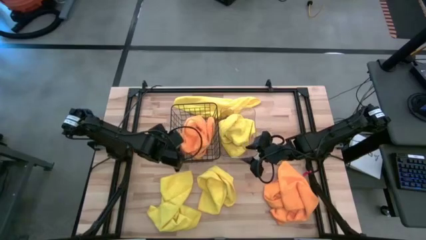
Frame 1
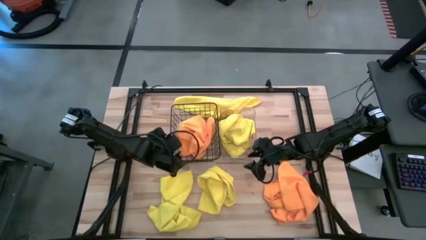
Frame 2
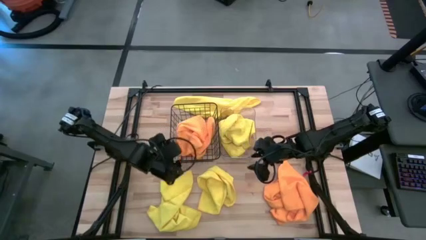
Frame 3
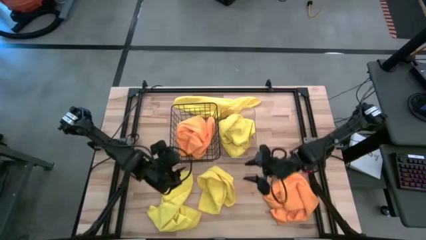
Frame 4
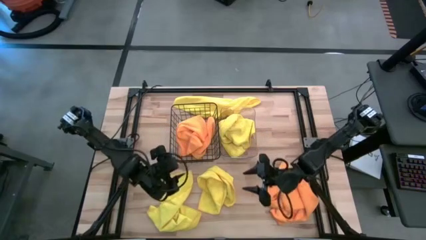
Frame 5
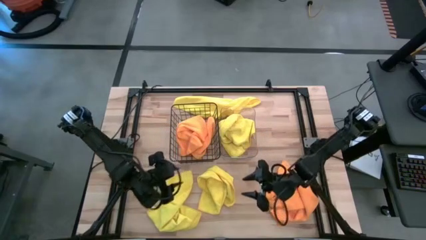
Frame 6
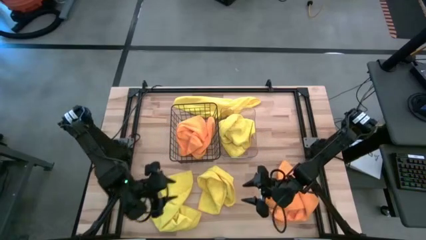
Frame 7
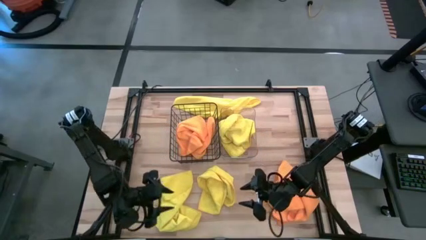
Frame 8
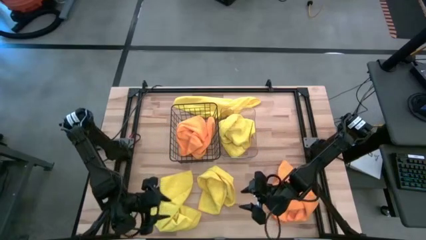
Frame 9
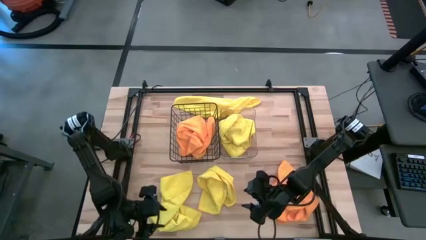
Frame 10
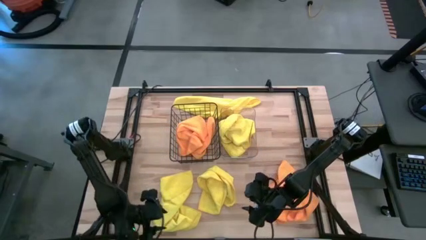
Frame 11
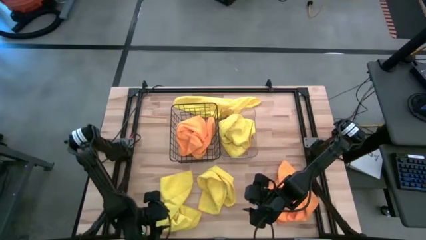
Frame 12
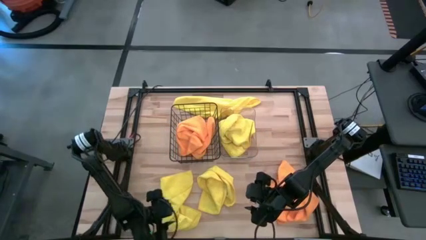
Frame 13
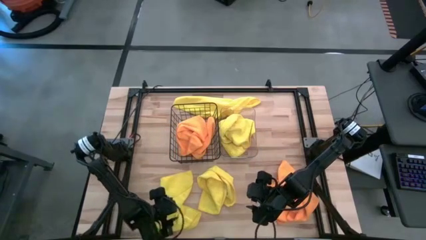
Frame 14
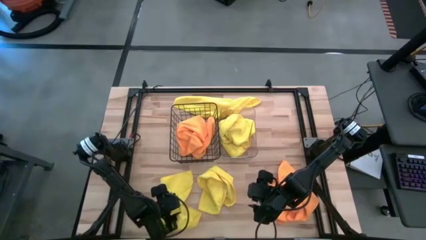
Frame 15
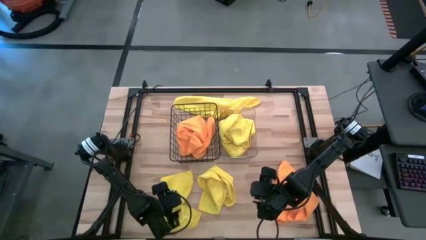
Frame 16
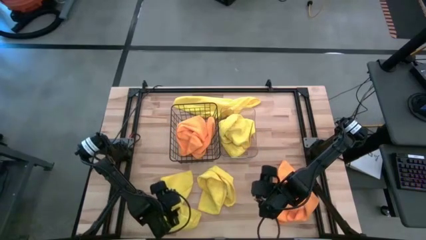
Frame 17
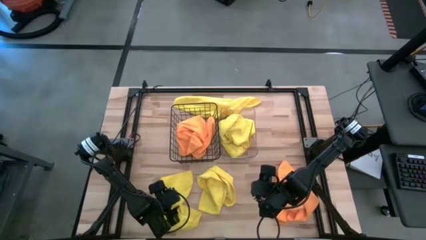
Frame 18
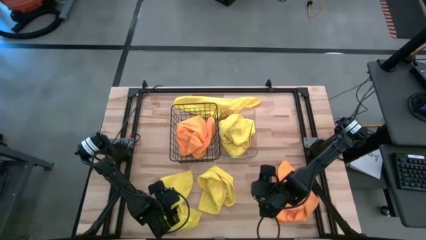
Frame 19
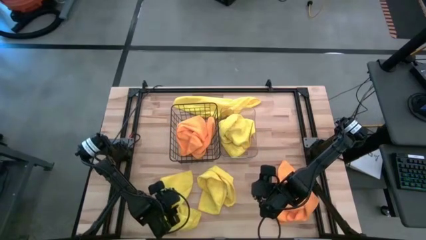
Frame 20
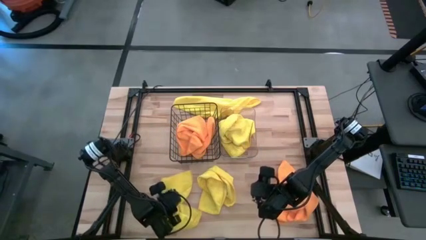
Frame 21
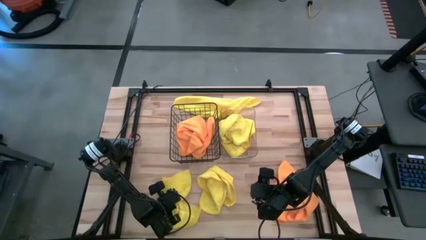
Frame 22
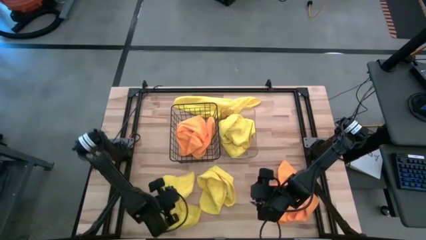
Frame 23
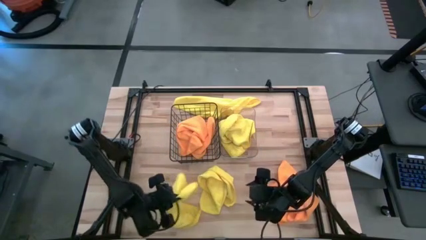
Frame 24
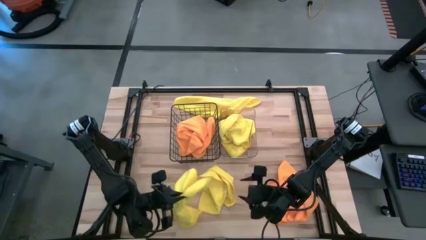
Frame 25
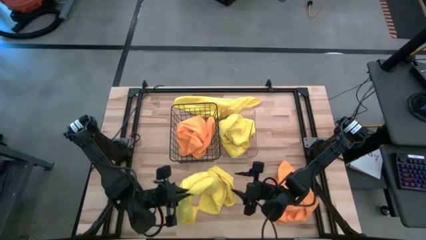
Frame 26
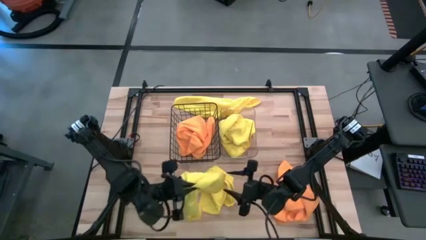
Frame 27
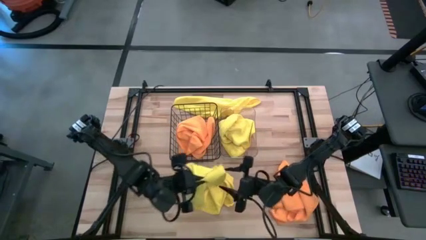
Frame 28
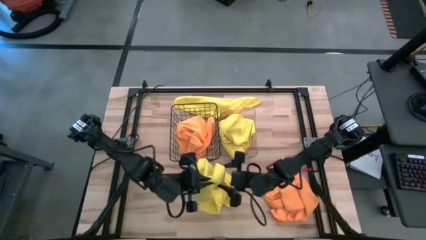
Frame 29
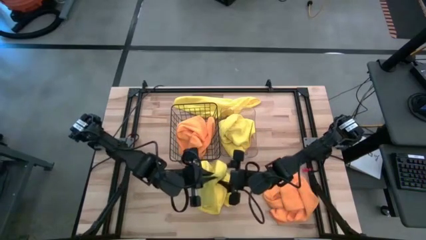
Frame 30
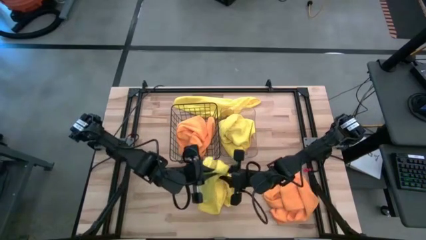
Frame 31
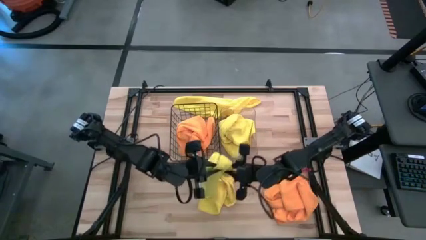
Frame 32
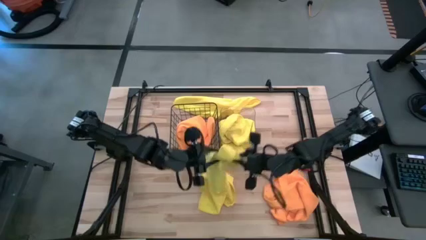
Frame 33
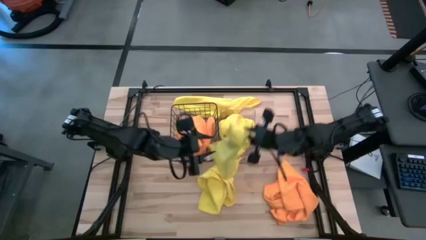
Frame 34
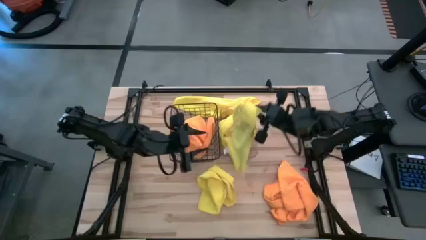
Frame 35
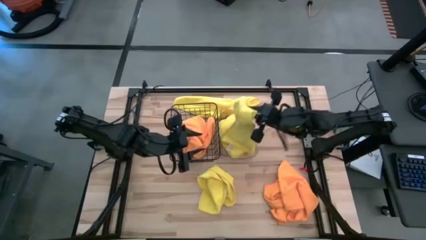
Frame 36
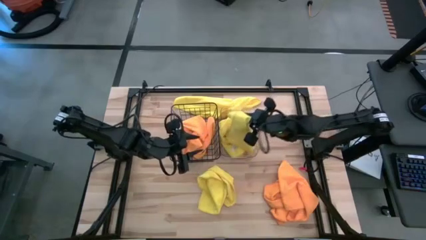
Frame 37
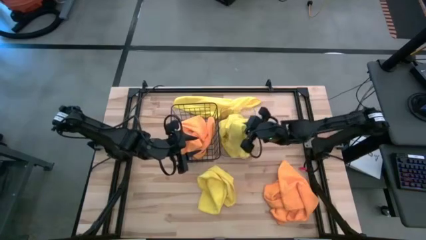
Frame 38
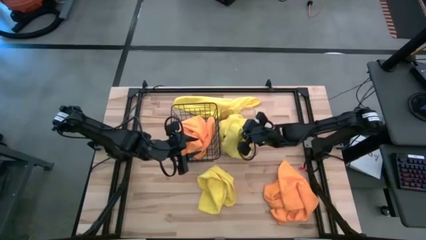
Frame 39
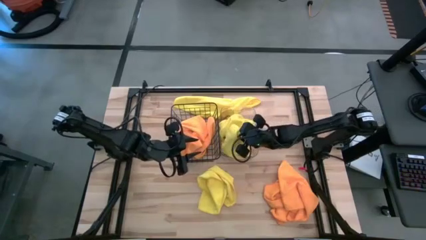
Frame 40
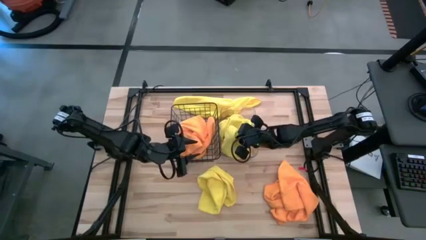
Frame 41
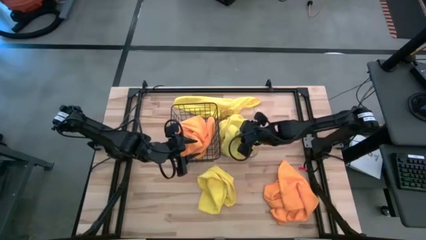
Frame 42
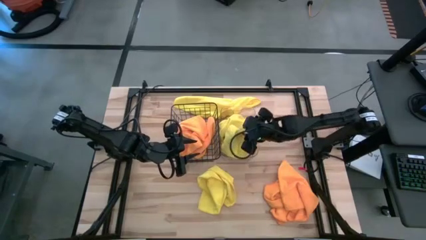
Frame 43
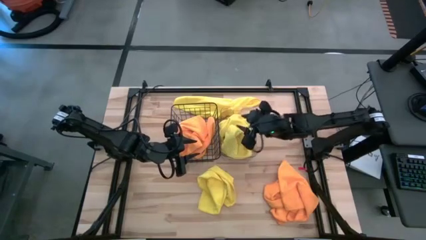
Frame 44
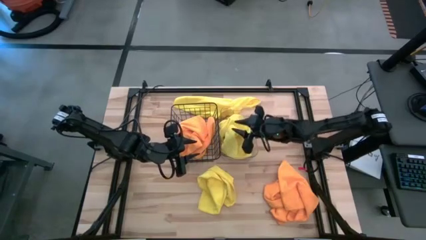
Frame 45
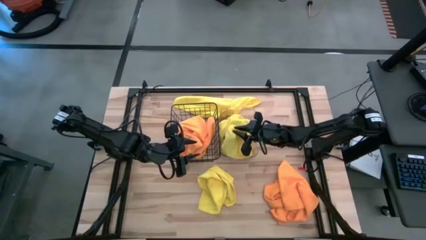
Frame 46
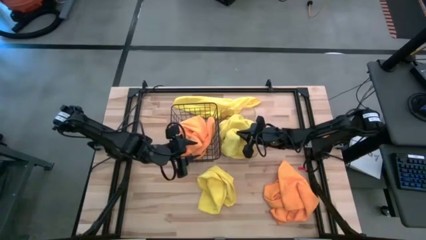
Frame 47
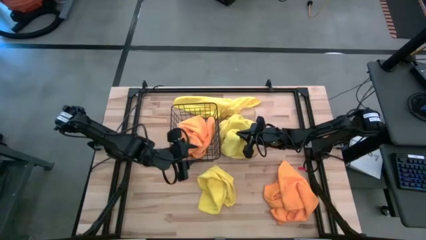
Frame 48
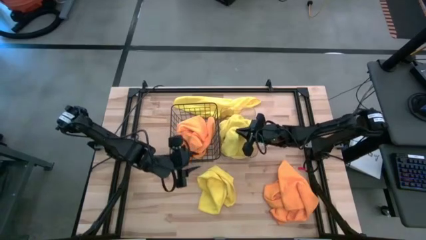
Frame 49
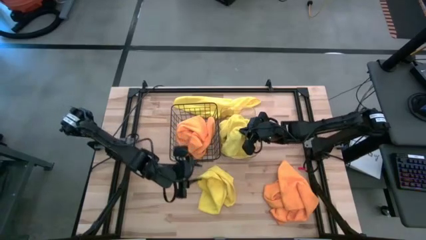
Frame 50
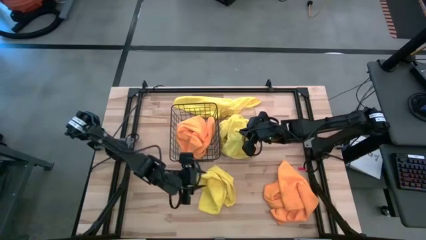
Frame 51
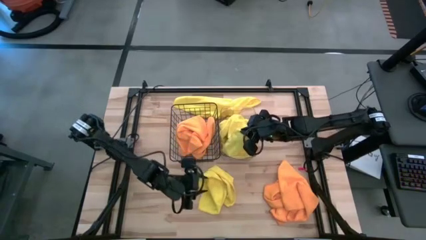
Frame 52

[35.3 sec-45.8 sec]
Task: Sort microfiber towel by color & place in baskets
Put the yellow microfiber towel into the transparent bin

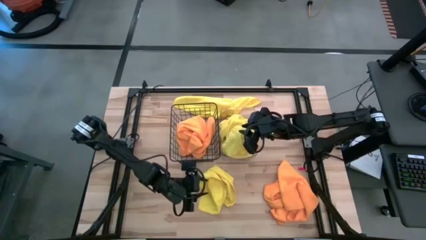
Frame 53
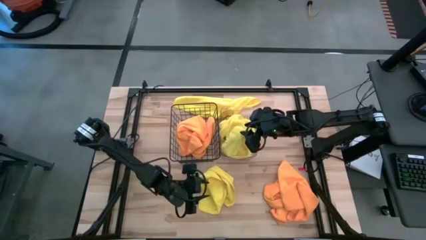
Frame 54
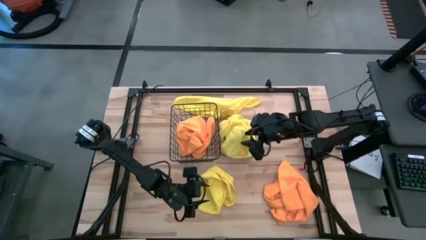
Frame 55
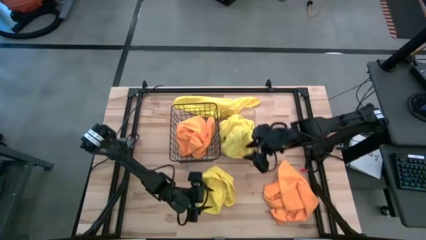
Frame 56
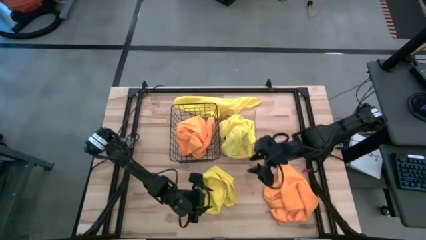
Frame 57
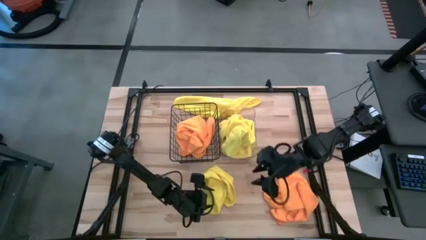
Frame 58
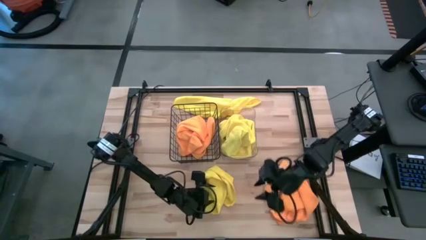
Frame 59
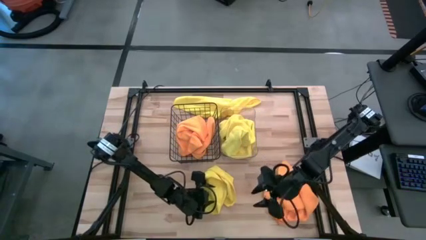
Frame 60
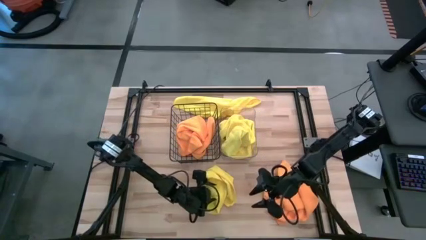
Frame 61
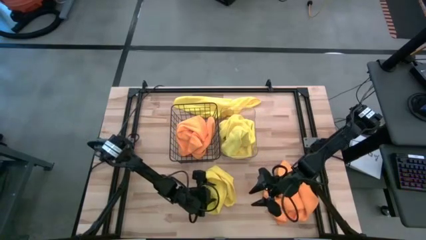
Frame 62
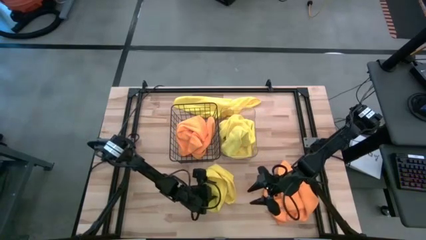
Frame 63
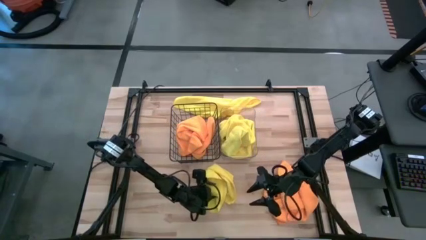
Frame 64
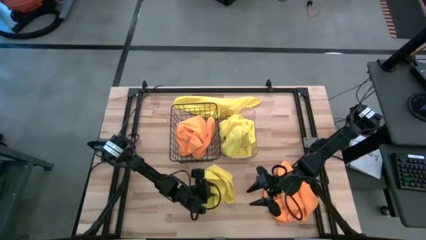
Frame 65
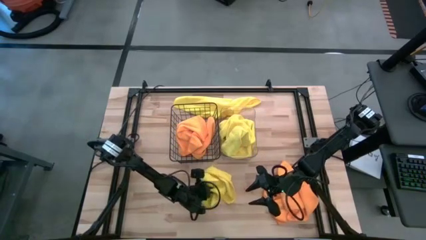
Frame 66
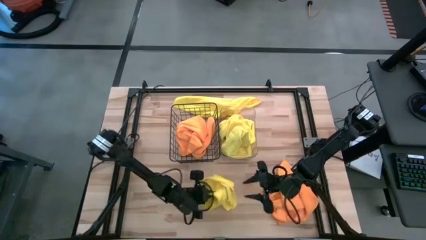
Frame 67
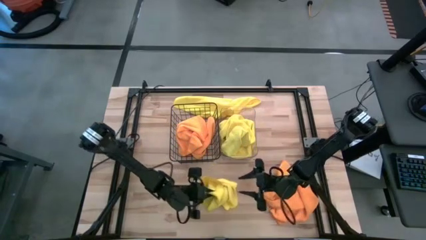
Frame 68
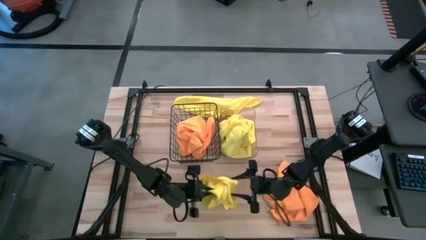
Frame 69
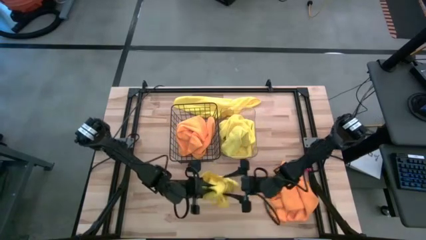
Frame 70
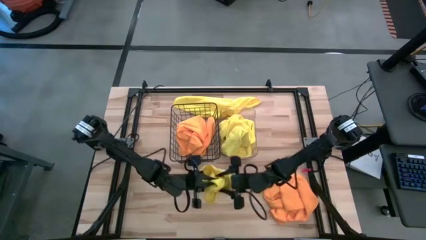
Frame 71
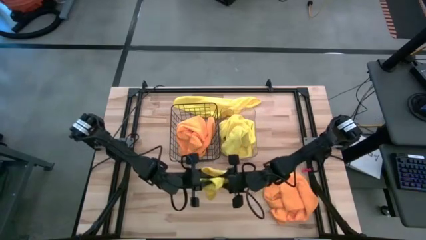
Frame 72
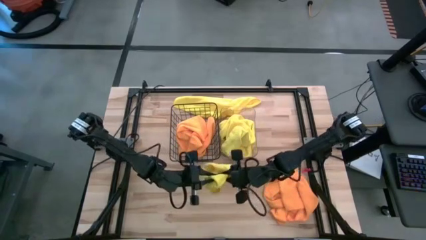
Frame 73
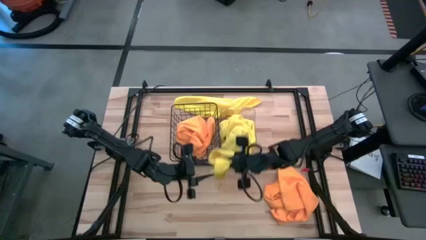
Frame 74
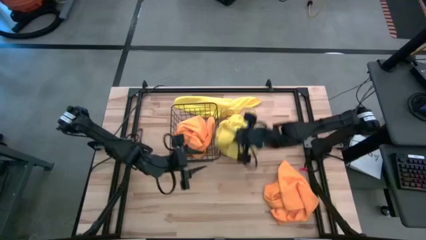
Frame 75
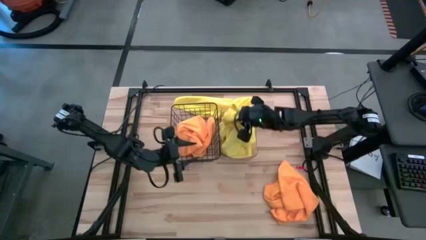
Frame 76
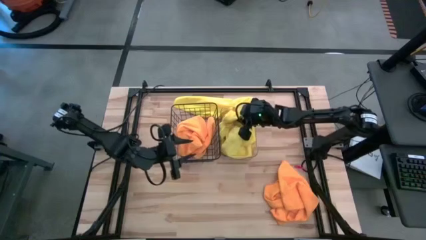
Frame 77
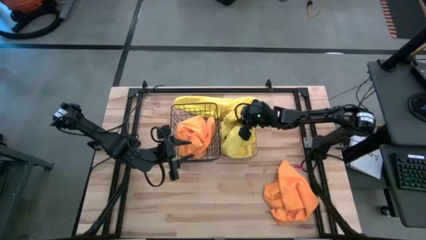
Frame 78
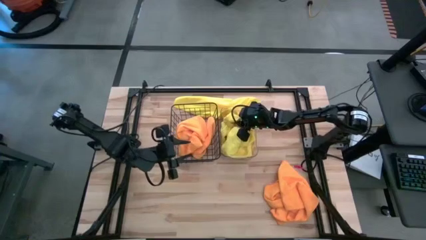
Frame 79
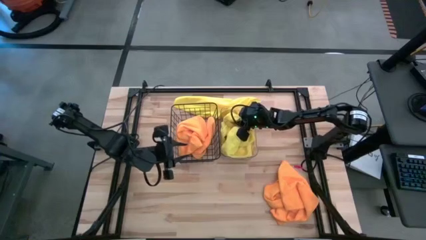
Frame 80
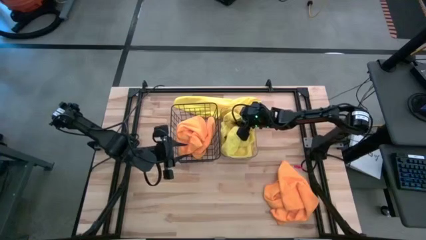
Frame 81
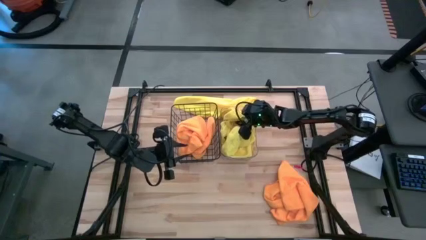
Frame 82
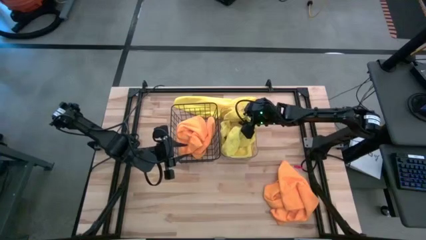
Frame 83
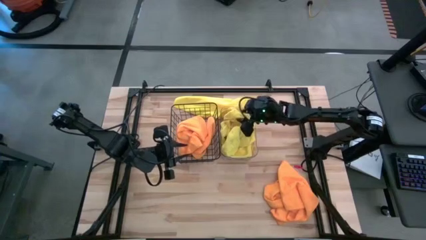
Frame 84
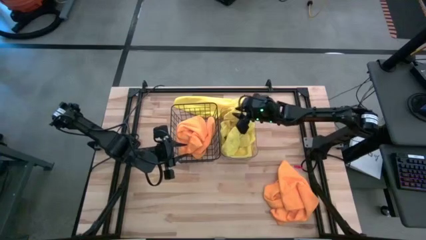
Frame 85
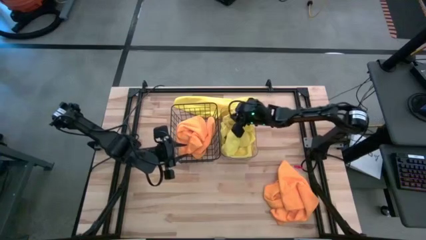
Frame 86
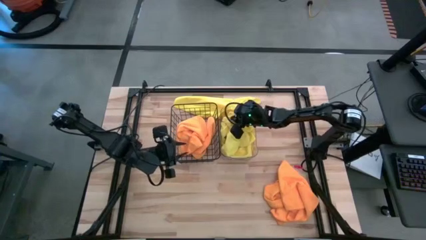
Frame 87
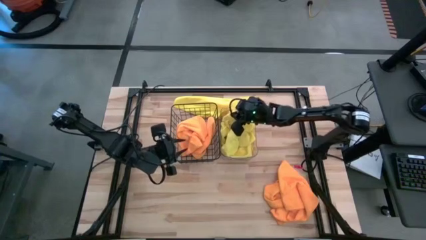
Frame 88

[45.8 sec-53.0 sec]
Put the yellow microfiber towel into the transparent bin
